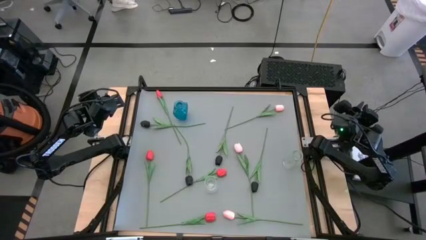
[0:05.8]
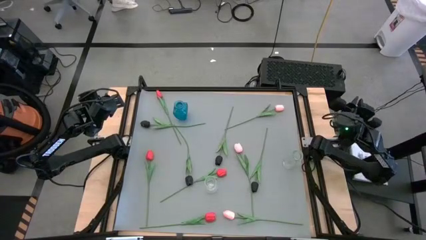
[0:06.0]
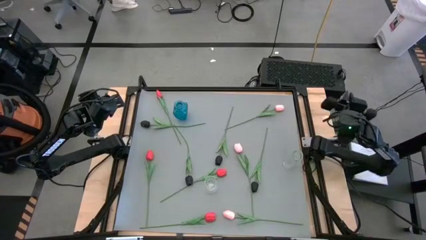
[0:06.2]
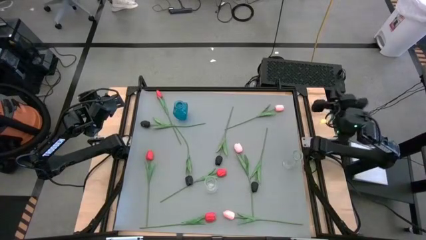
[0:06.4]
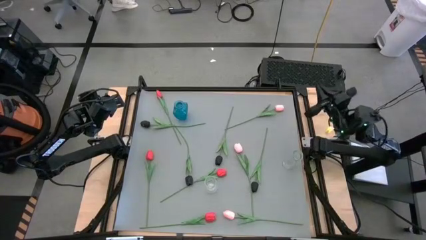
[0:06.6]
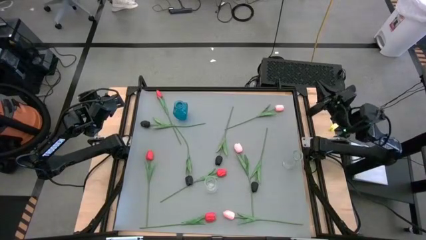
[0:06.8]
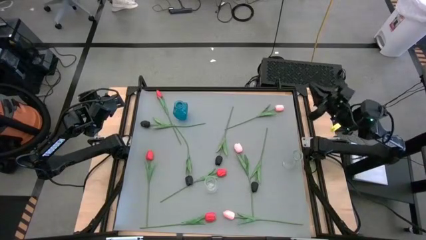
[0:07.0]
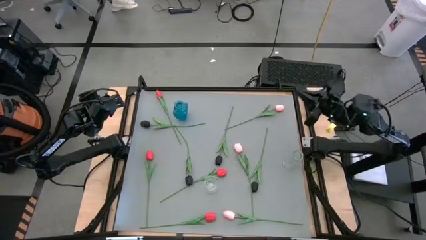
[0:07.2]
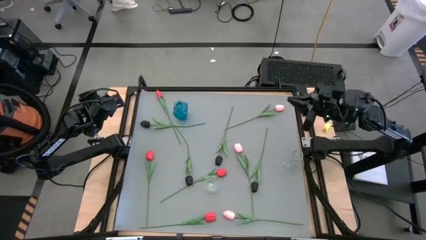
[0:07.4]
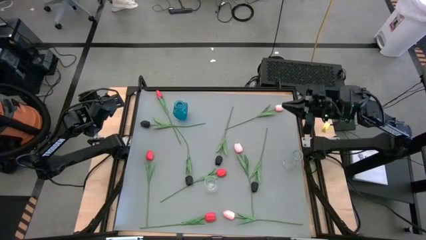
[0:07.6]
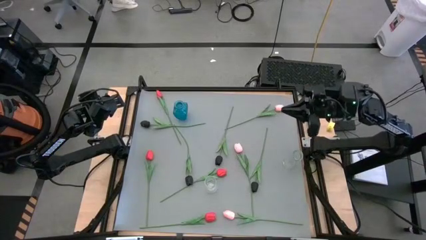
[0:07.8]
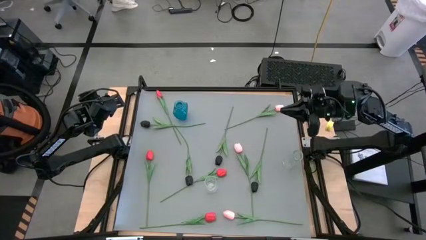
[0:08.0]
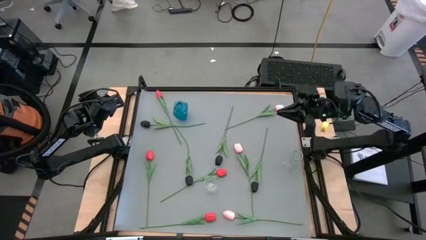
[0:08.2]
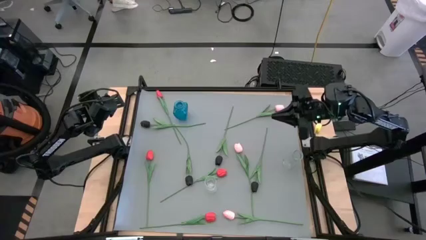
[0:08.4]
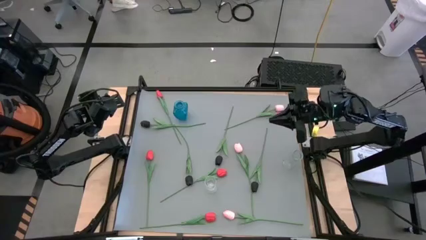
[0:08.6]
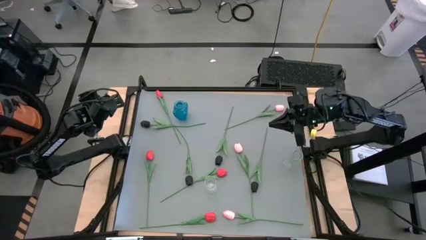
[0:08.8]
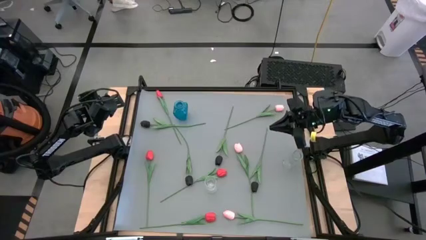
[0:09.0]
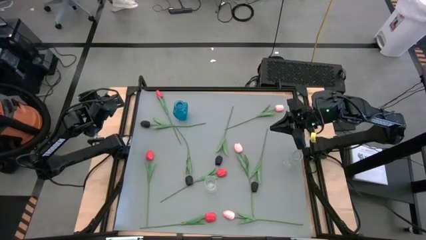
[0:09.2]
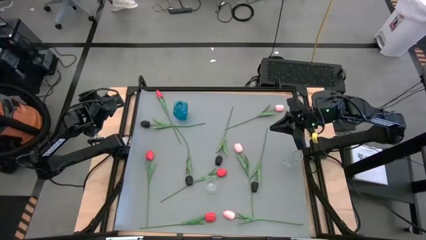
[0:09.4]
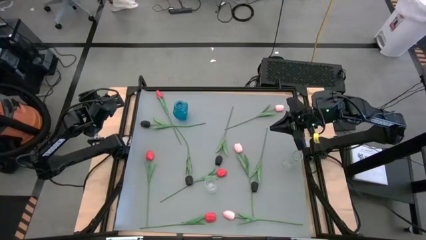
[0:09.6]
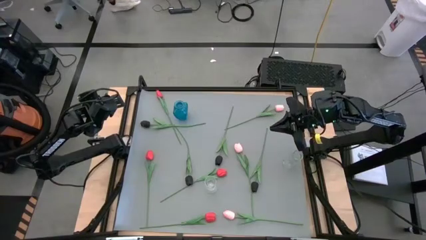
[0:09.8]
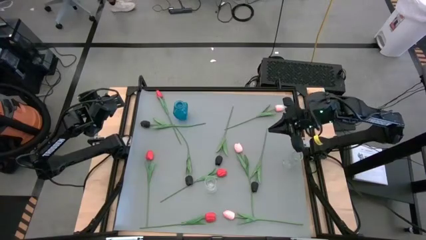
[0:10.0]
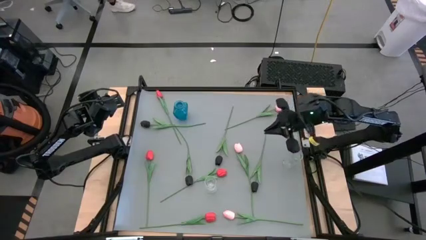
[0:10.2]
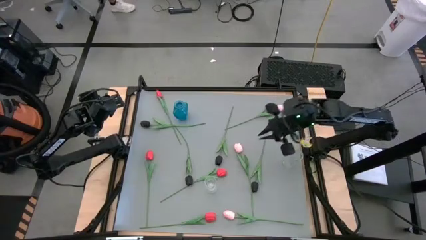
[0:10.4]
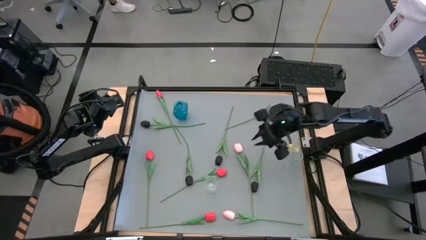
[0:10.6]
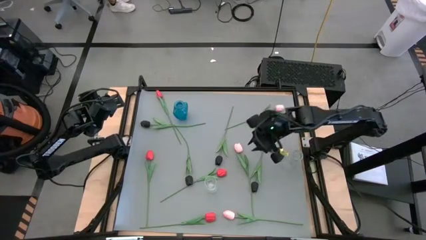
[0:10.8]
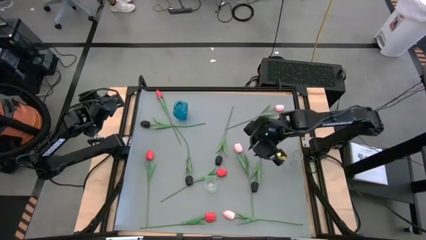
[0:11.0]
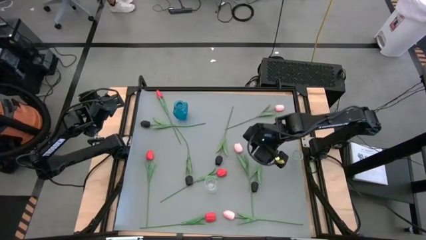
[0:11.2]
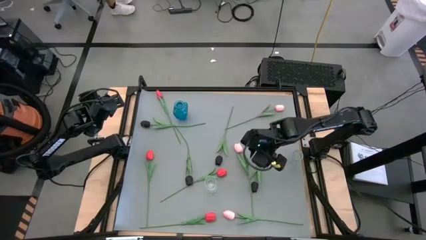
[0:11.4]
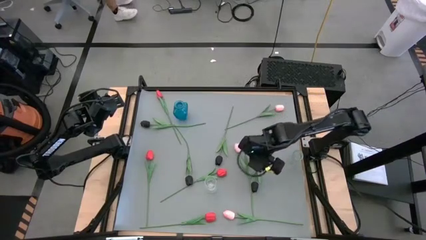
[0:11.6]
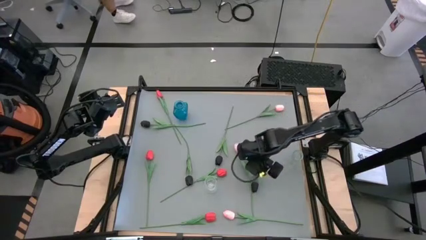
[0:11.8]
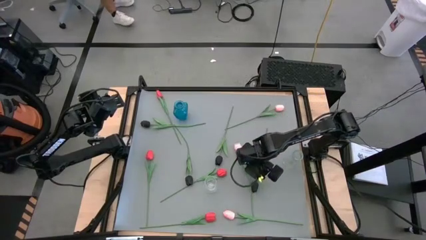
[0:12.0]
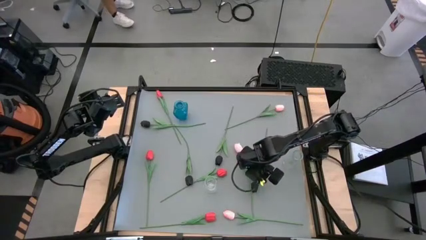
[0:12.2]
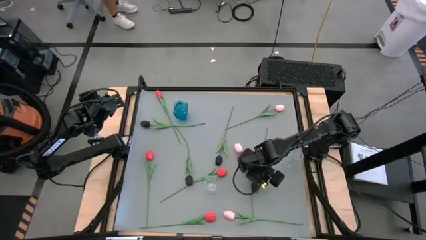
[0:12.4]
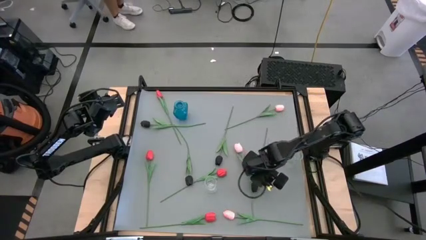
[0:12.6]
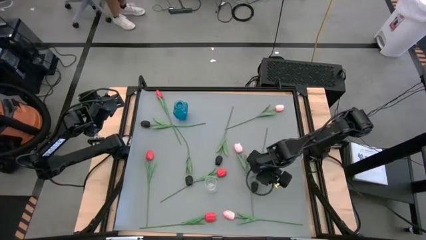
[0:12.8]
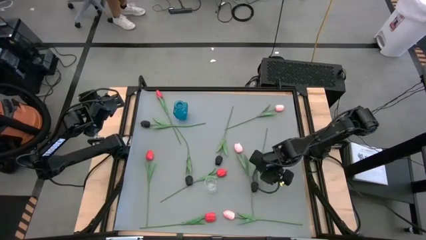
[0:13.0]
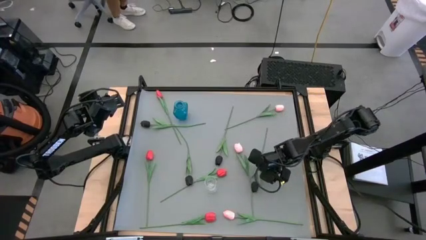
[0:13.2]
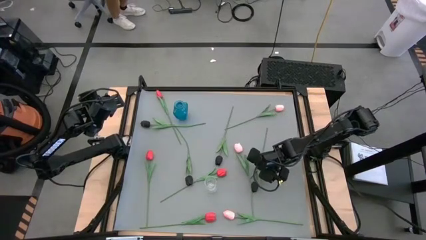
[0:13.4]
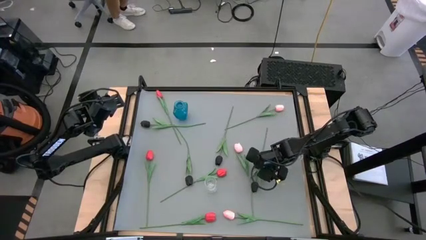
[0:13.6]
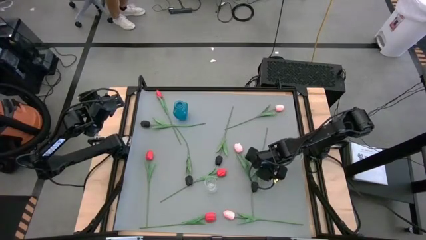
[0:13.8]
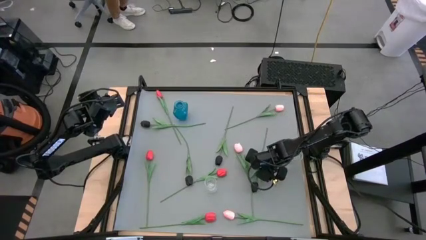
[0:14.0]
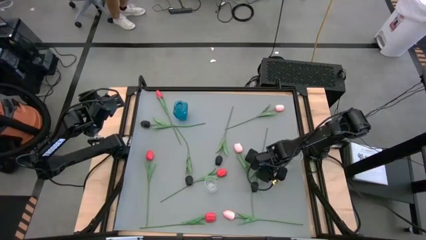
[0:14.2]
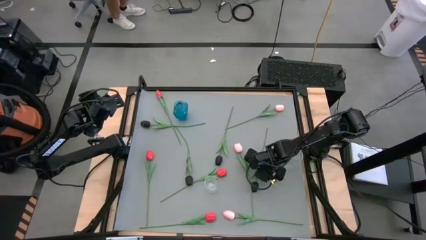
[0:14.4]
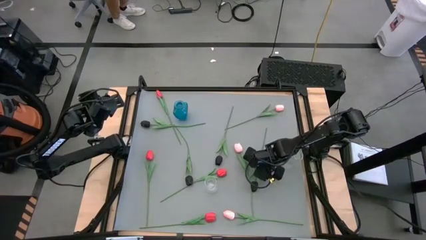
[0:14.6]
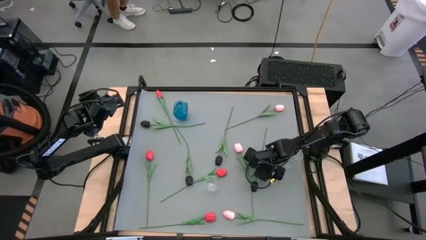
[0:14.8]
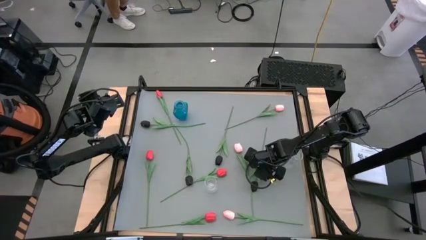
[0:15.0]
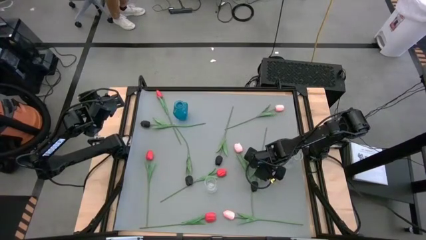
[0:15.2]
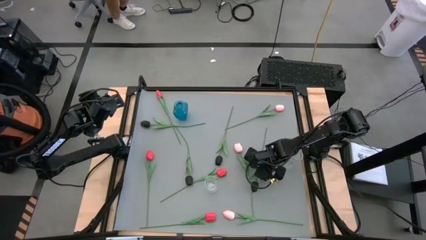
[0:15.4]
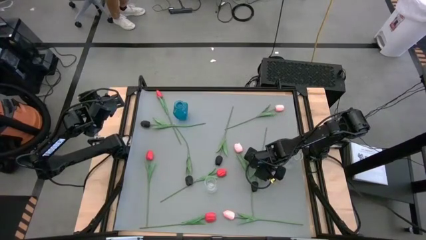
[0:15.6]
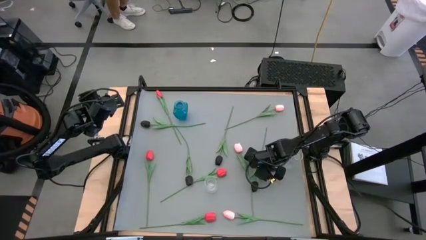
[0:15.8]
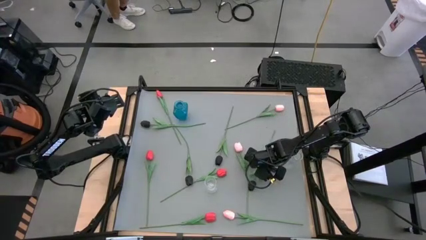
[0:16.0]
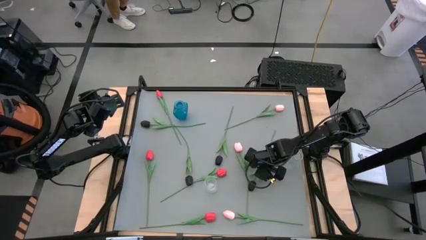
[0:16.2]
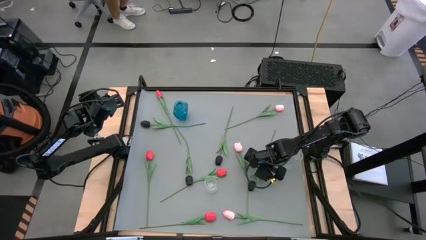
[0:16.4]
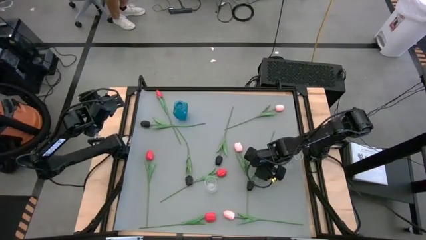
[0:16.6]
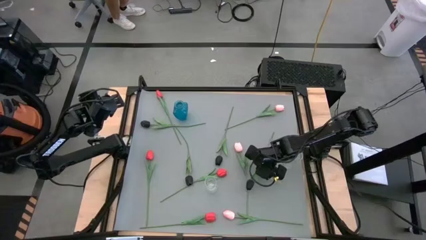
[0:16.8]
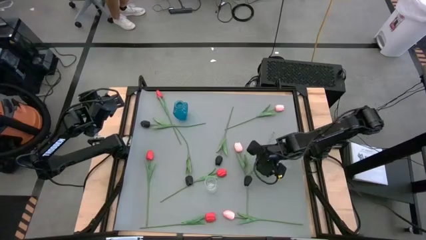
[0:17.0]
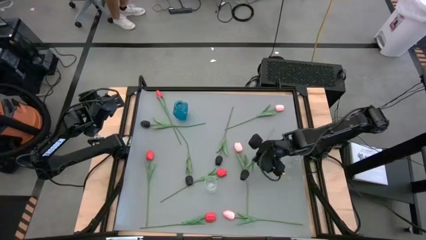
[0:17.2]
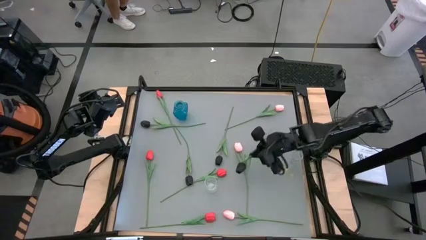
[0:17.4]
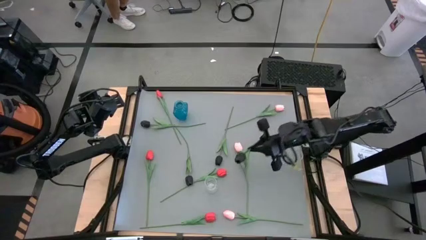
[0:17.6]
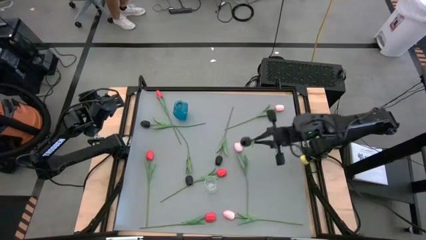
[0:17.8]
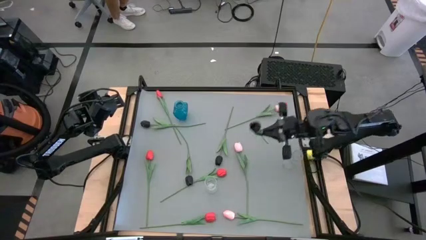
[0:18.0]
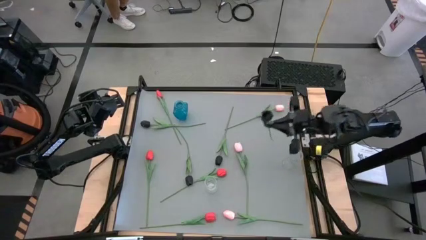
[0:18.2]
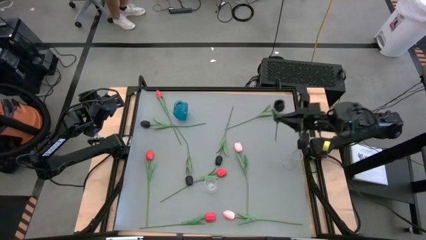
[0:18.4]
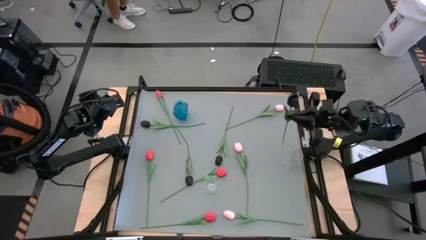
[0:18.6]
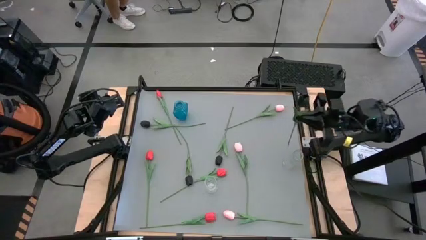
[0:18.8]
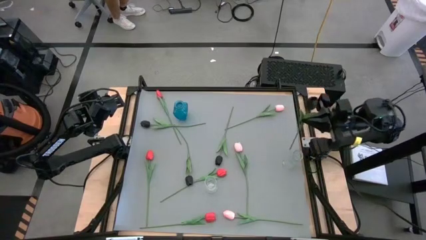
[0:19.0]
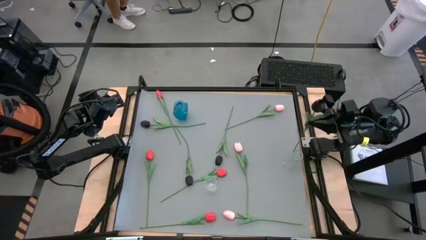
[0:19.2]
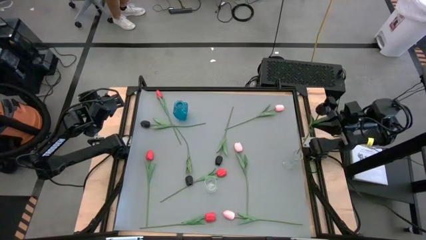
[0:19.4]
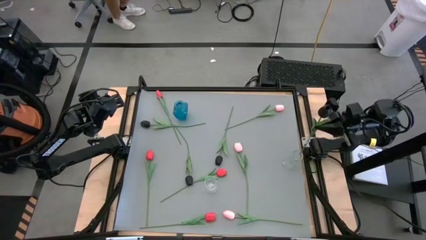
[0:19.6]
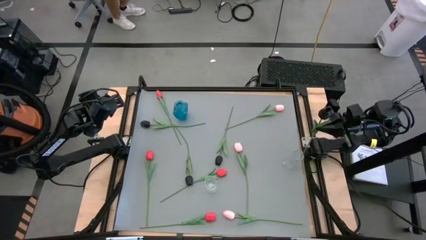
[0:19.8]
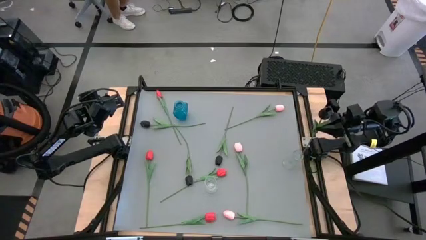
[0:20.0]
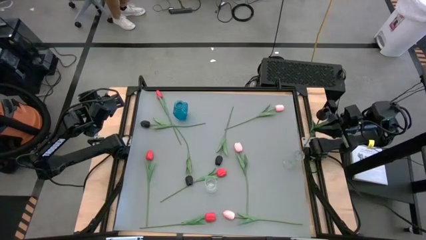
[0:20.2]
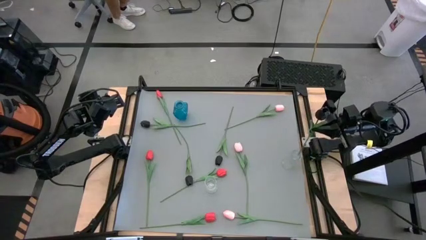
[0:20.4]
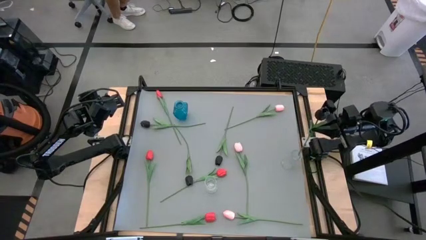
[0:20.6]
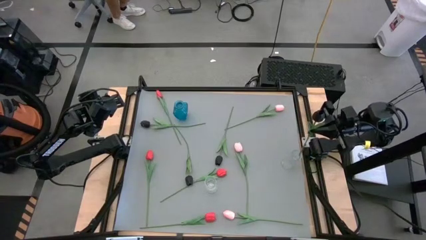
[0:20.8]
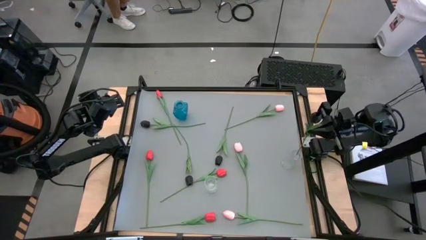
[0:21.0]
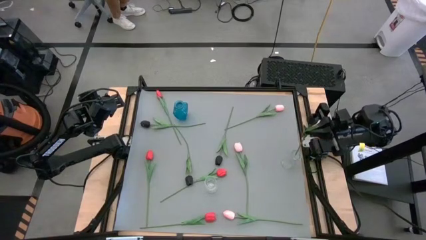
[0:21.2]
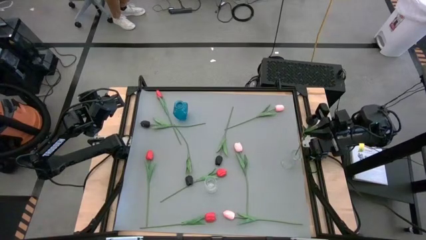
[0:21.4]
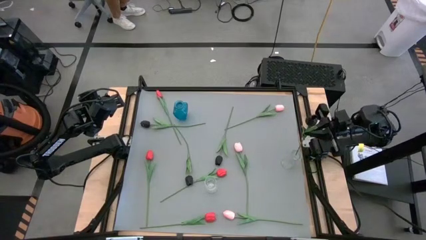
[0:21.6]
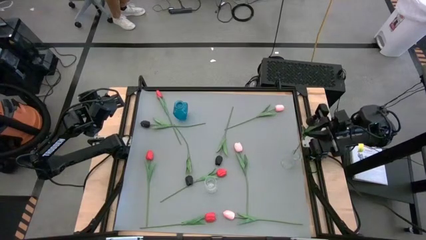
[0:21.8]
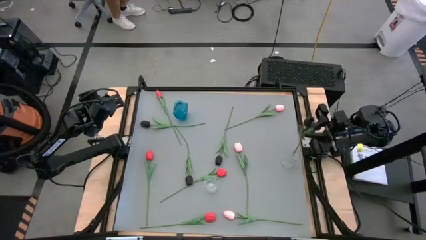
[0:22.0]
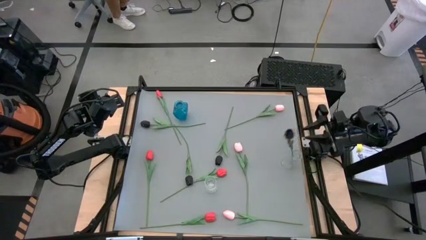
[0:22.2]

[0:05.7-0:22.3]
Task: Sort flowers into vase by color
Put the black flower into the right transparent vase
